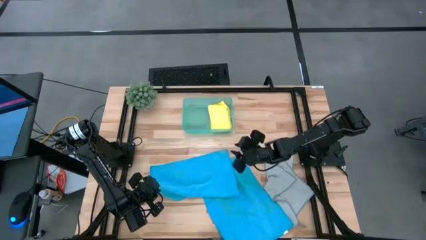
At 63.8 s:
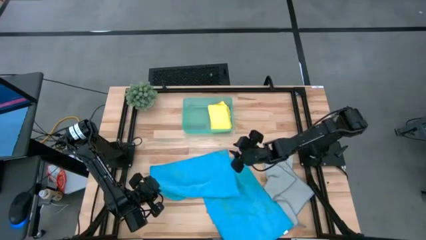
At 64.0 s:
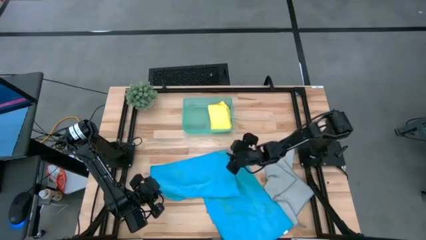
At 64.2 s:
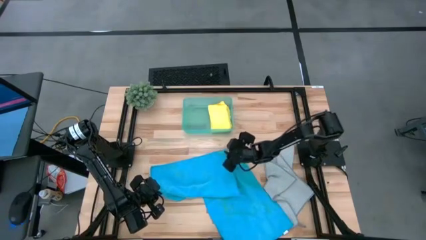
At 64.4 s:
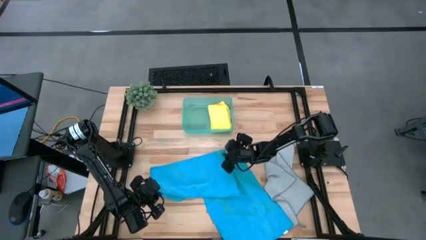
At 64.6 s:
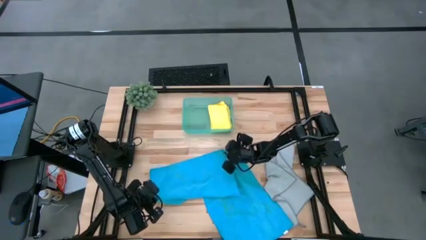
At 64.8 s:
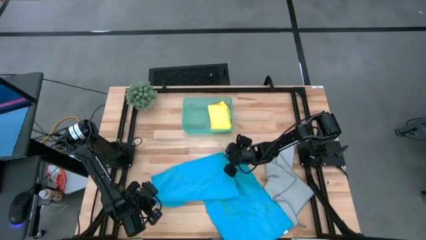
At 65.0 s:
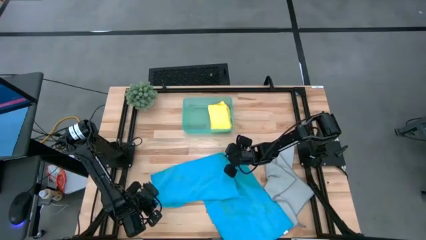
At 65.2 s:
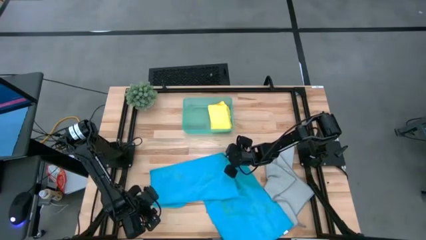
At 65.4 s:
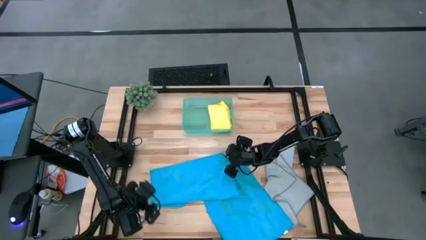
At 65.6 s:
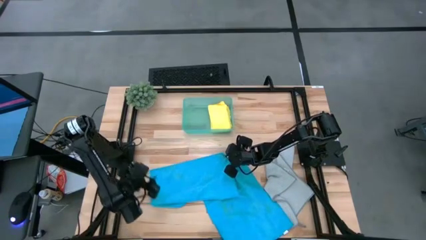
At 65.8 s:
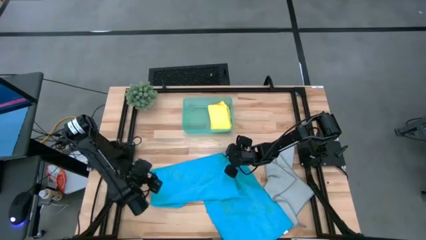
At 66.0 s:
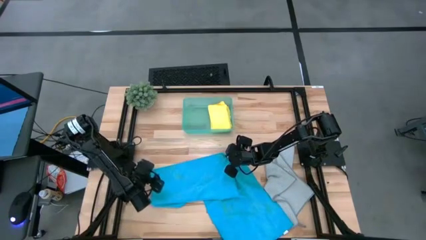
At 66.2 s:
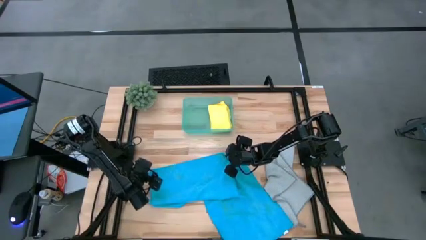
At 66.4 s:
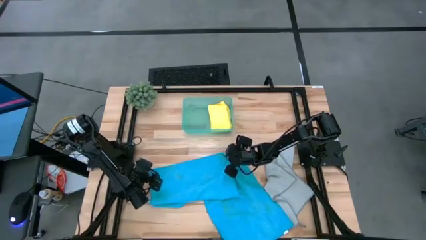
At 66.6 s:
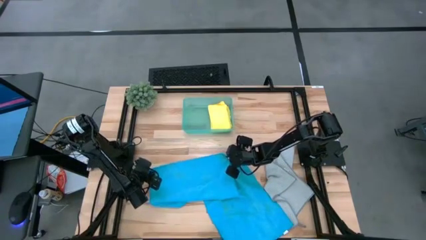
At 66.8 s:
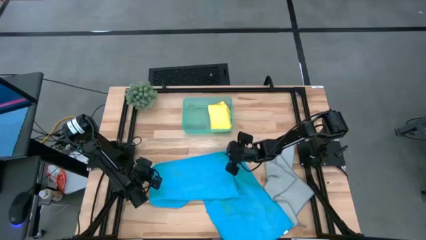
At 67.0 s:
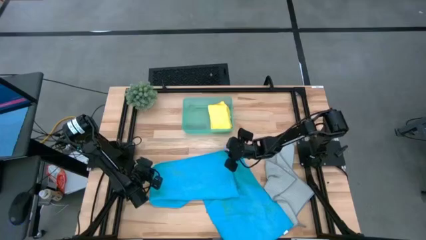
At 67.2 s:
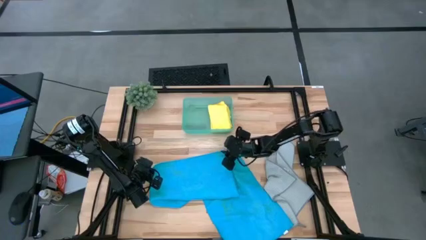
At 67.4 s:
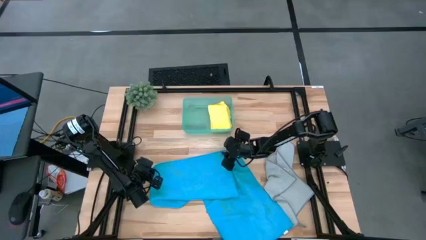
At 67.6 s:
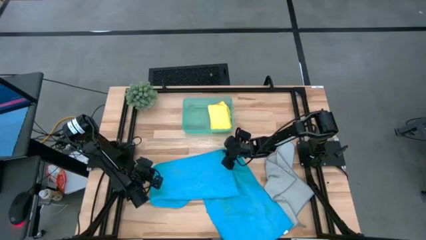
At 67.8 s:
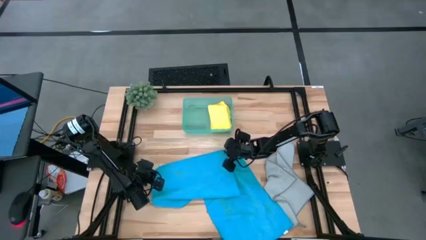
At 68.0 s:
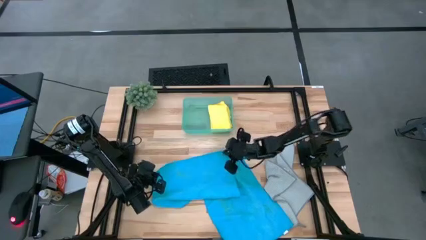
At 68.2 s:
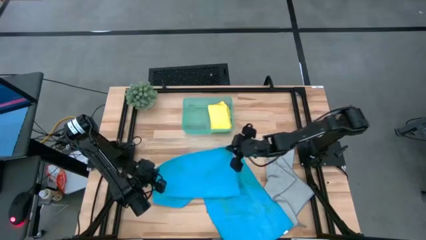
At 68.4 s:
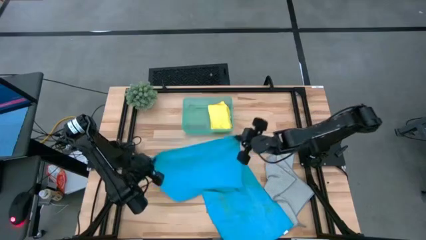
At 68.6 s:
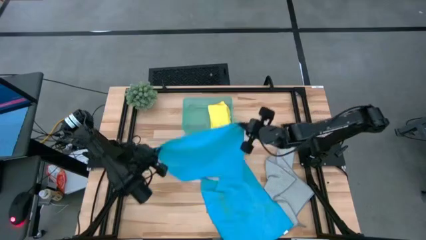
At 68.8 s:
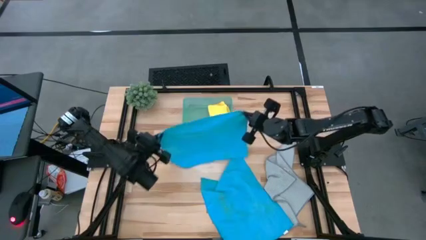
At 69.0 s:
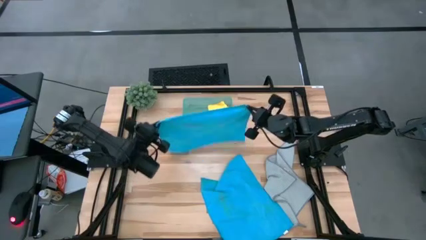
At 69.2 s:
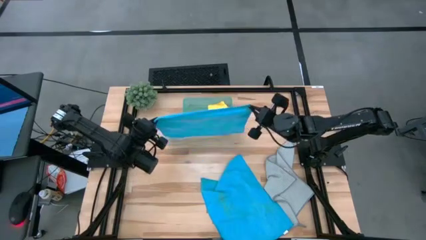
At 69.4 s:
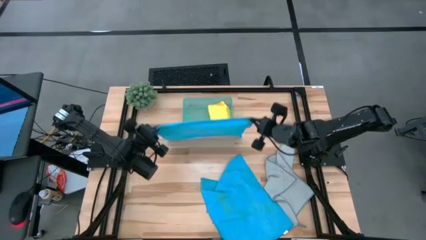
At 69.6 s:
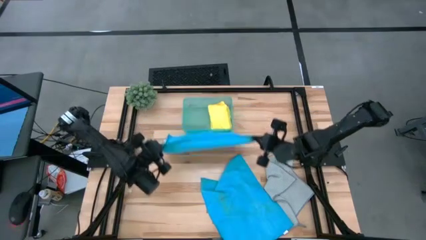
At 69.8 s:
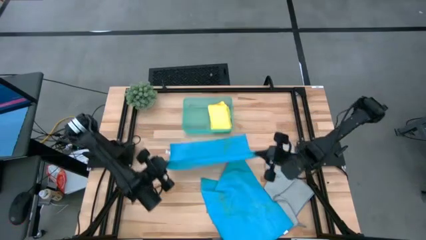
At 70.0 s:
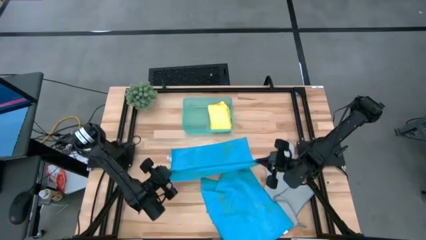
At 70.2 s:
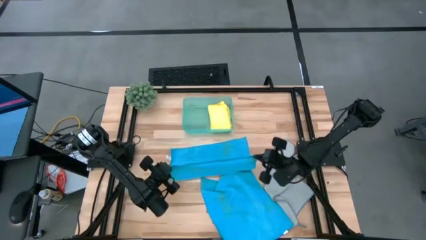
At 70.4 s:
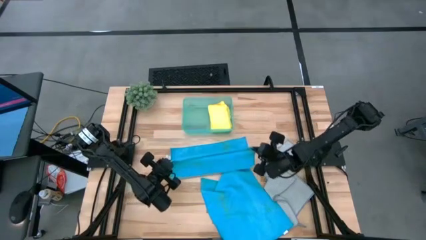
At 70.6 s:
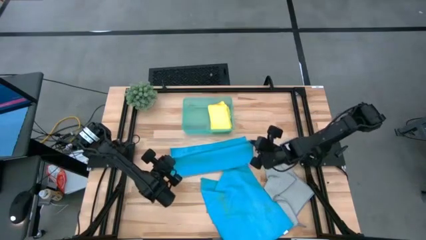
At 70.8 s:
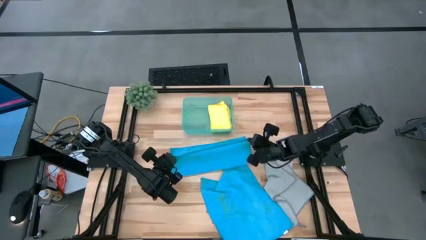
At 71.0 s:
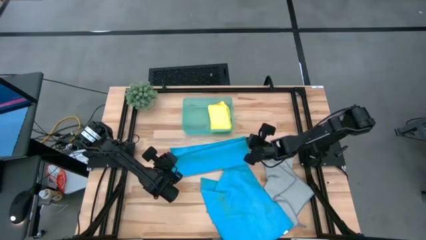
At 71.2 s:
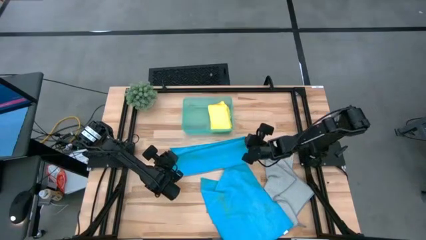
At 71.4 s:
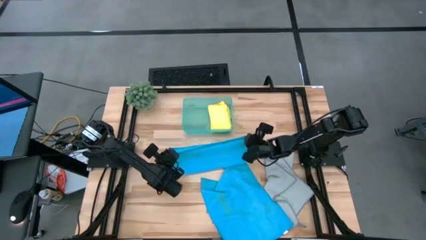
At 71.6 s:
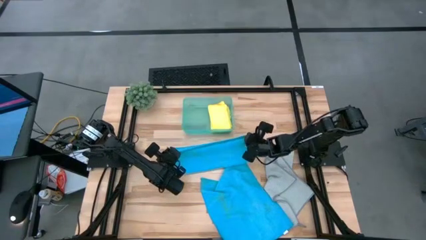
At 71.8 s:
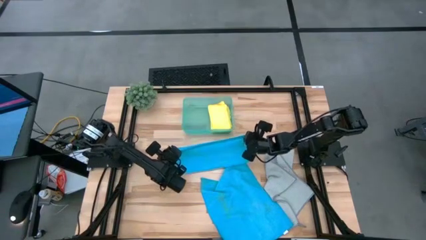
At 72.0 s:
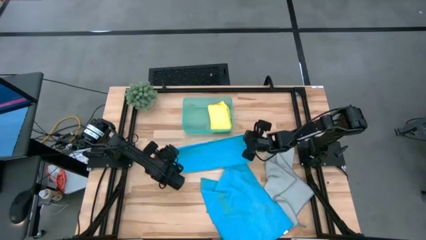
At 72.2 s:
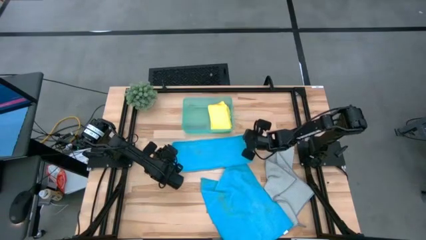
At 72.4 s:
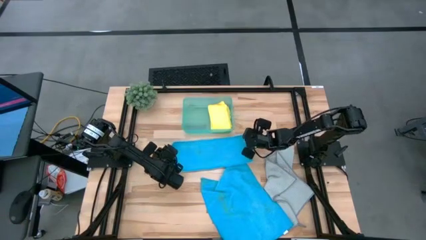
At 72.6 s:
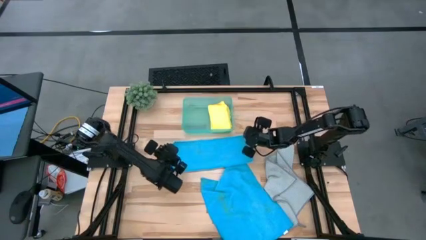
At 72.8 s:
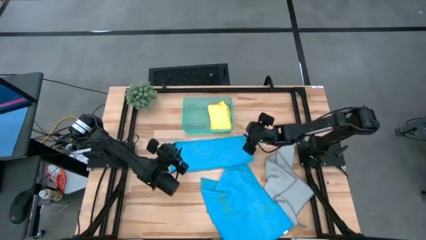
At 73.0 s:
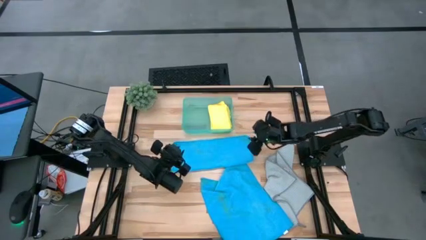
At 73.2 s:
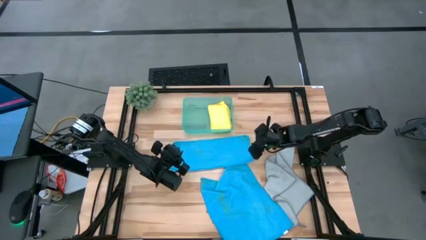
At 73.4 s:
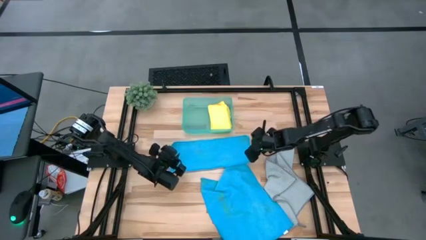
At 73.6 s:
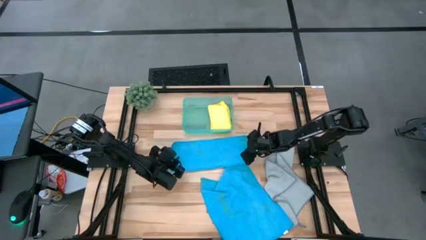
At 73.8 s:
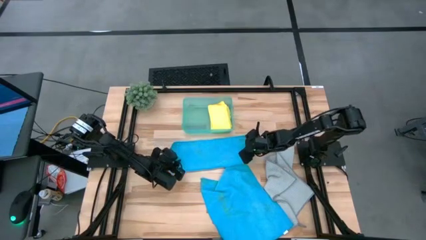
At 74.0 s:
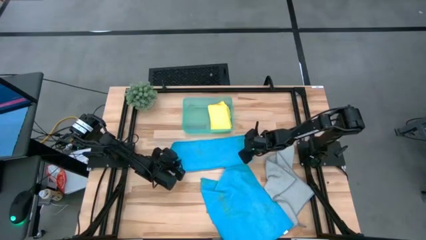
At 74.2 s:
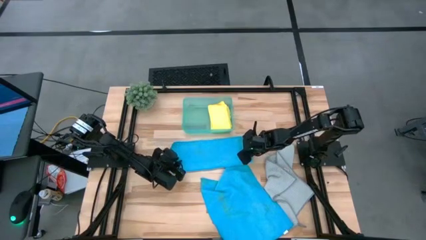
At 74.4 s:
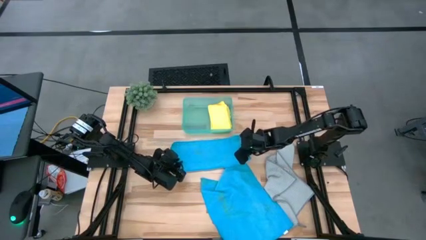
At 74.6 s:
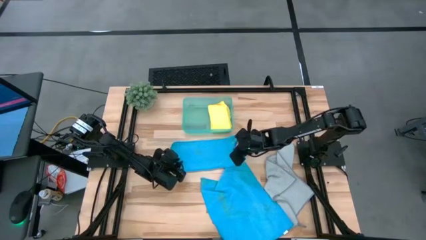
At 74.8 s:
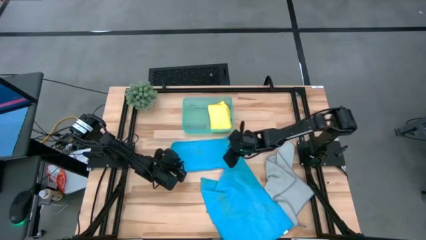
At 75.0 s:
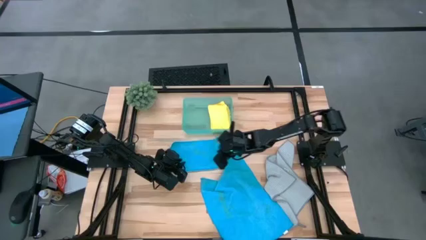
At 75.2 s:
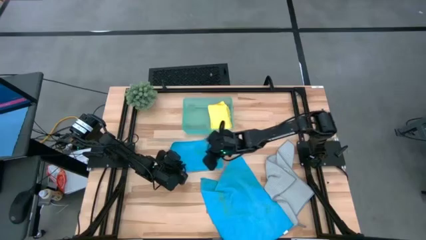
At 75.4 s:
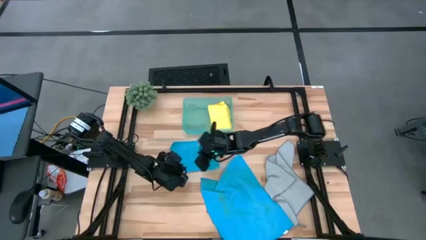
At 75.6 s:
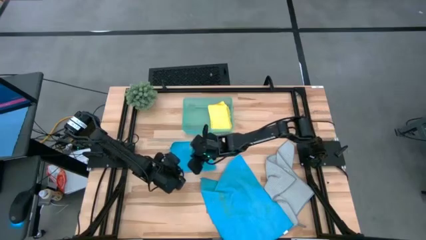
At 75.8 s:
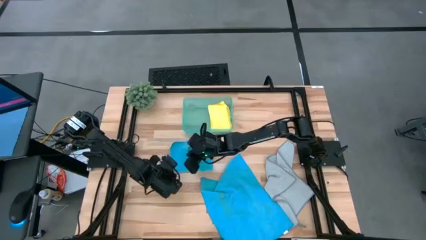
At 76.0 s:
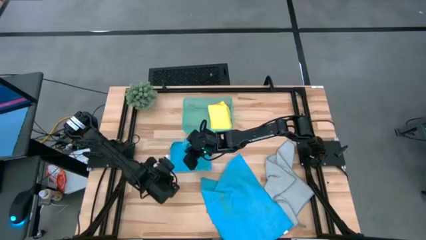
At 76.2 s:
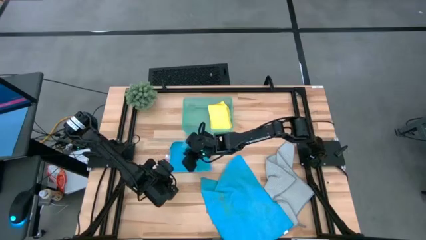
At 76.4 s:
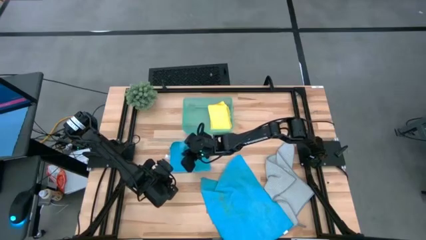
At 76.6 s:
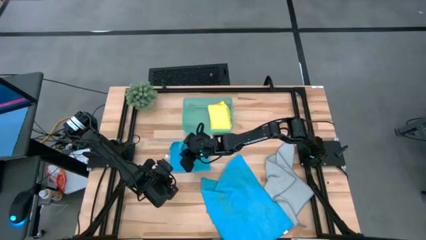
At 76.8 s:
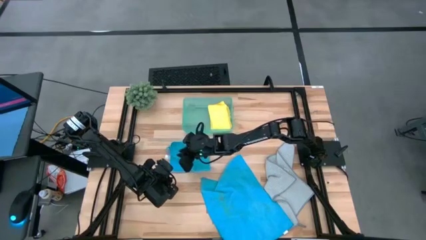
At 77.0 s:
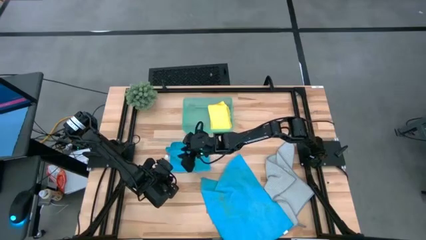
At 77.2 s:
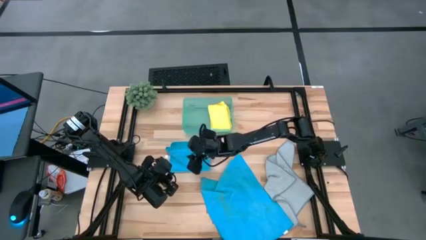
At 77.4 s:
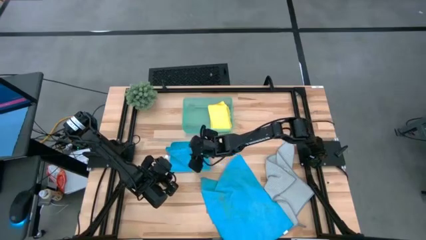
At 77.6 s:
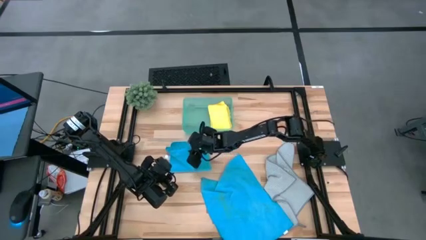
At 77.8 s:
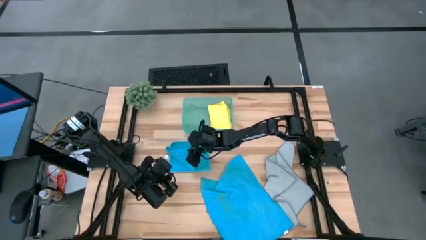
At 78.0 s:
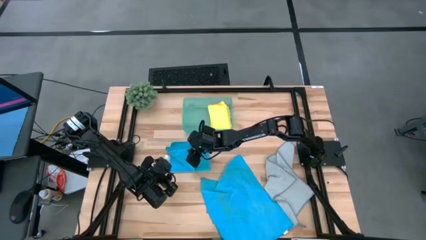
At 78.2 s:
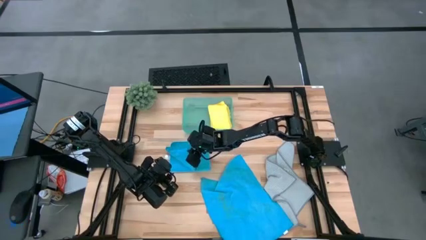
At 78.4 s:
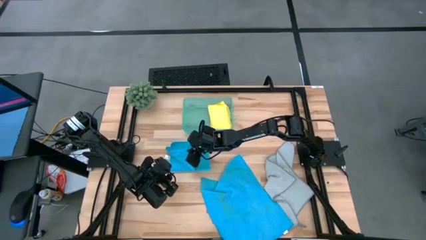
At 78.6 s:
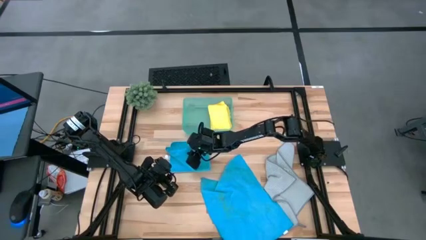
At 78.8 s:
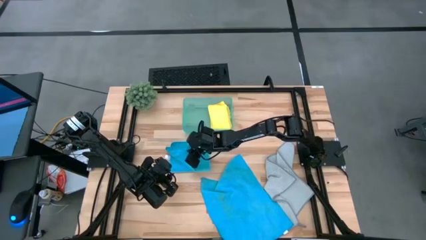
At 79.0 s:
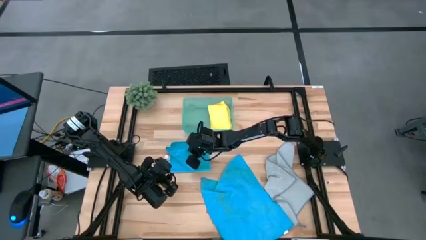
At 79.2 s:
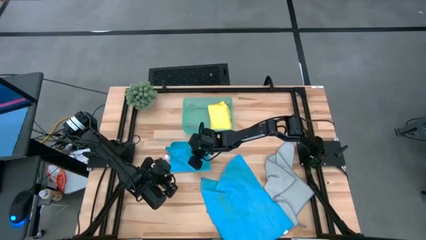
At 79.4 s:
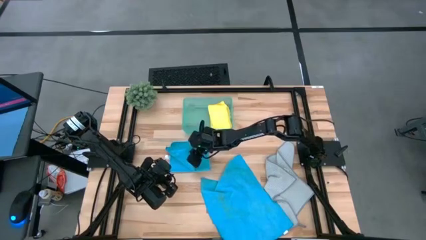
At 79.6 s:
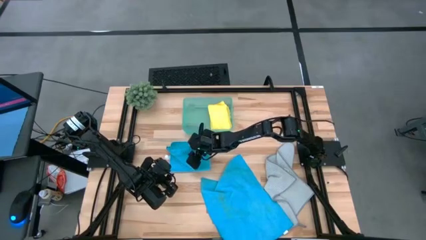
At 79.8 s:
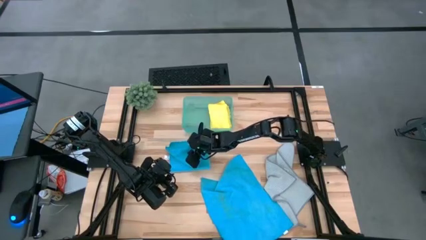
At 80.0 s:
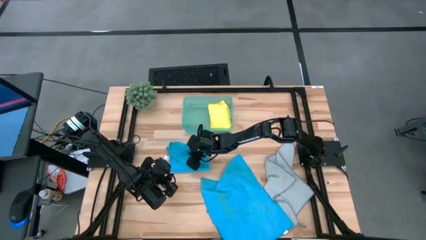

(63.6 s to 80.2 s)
Task: Fold microfiber towels
Fold the left blue microfiber towel
